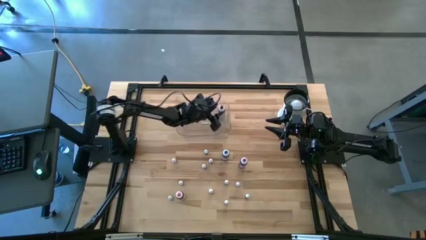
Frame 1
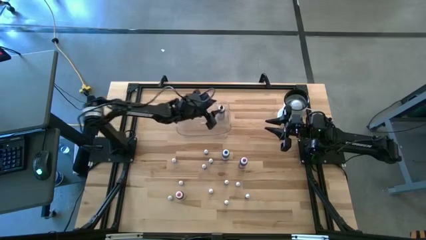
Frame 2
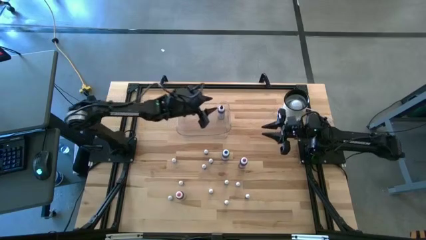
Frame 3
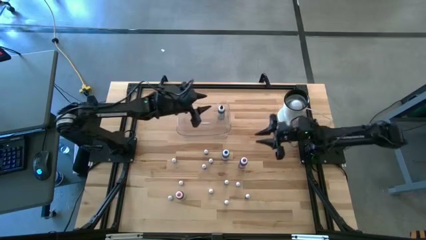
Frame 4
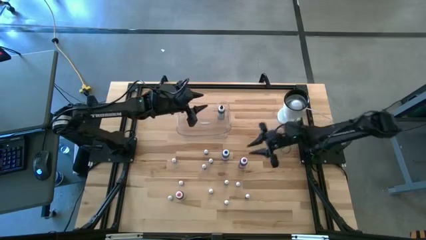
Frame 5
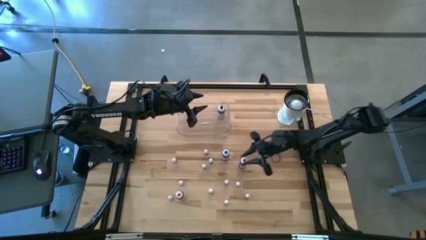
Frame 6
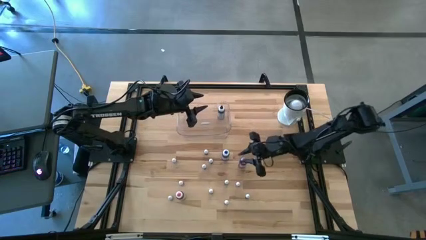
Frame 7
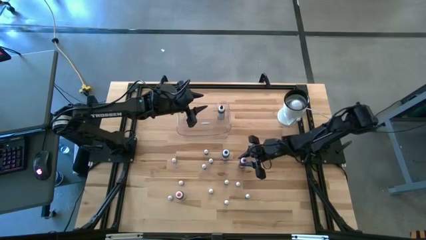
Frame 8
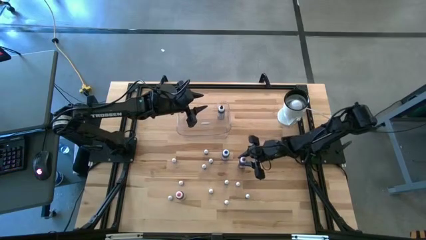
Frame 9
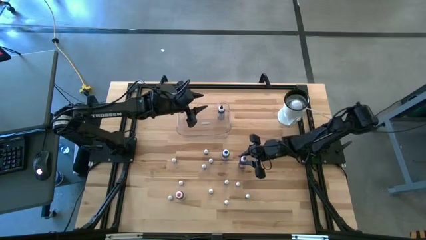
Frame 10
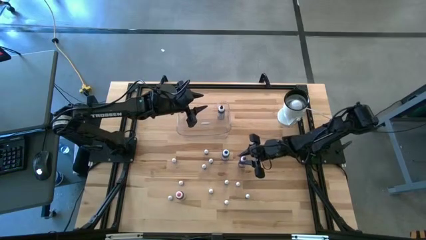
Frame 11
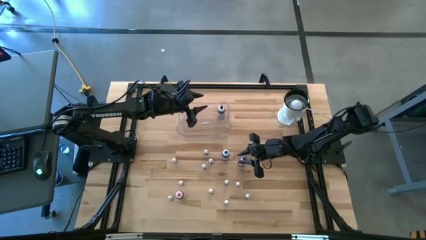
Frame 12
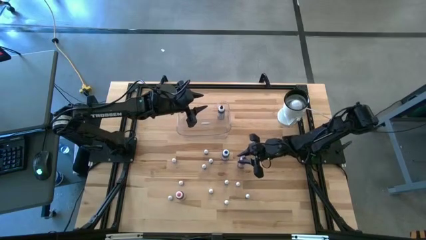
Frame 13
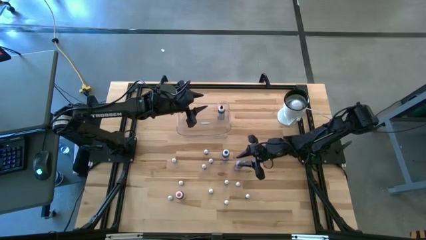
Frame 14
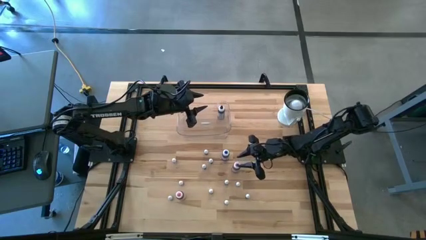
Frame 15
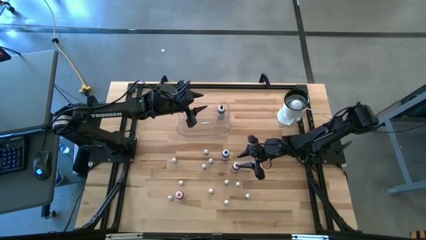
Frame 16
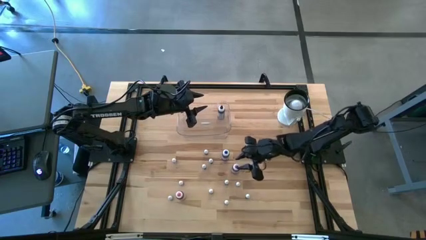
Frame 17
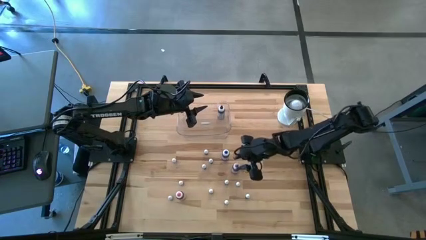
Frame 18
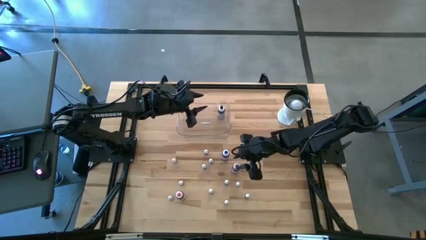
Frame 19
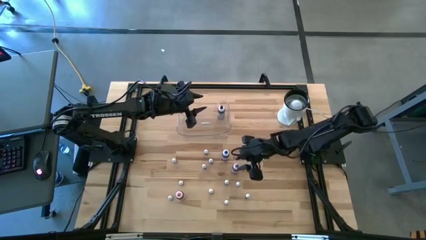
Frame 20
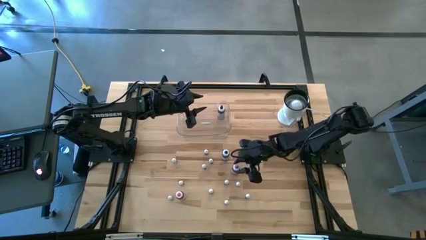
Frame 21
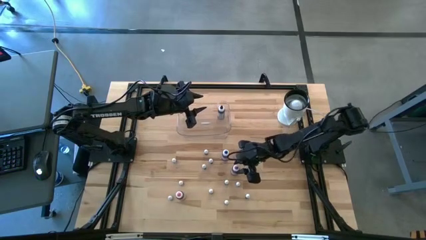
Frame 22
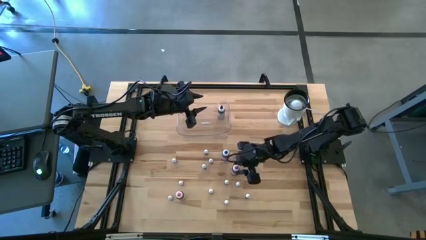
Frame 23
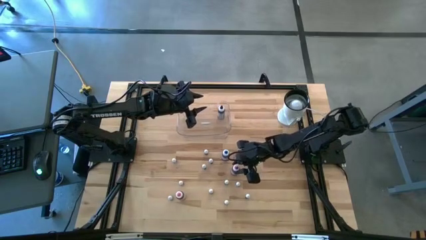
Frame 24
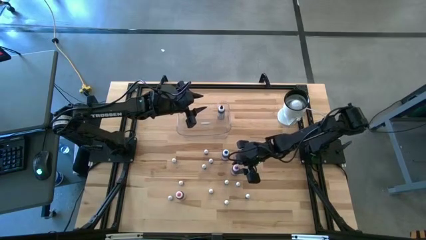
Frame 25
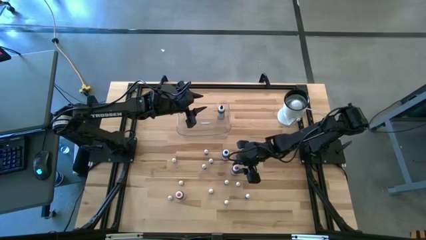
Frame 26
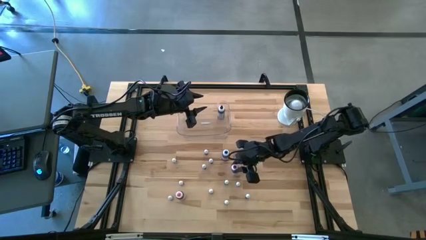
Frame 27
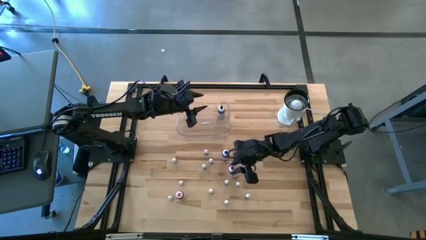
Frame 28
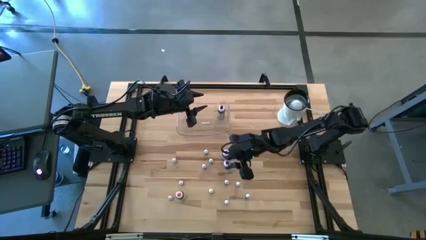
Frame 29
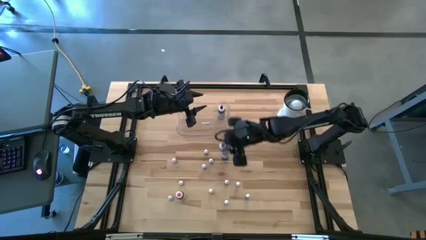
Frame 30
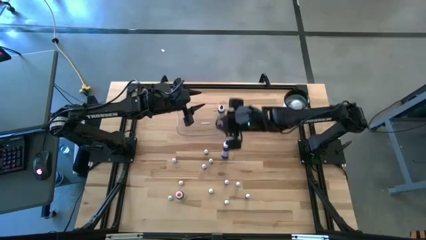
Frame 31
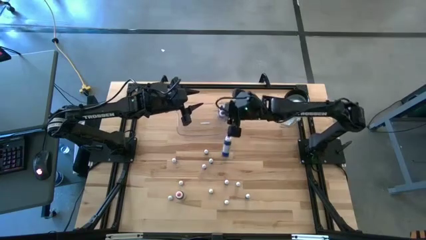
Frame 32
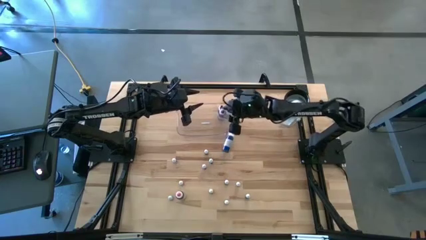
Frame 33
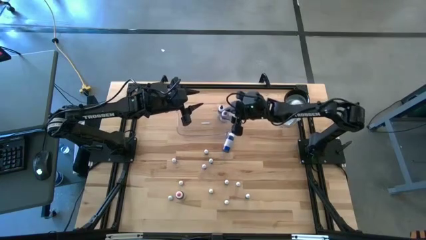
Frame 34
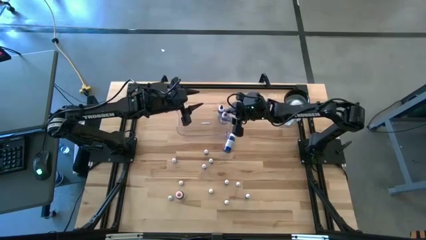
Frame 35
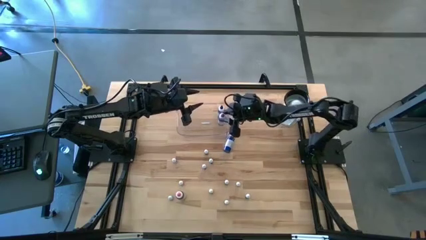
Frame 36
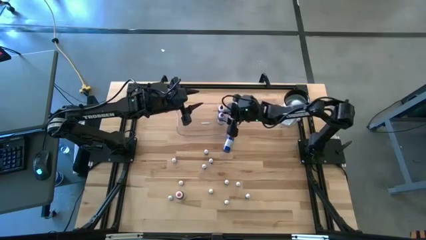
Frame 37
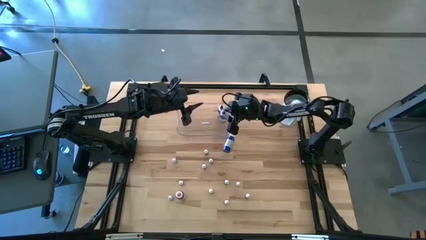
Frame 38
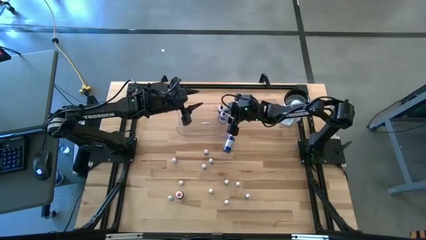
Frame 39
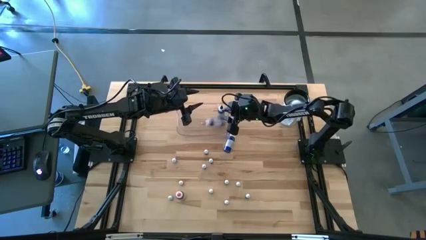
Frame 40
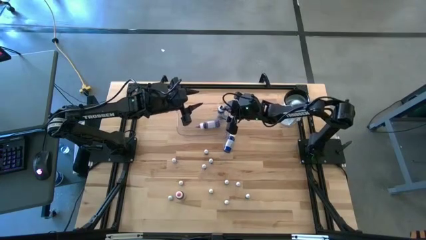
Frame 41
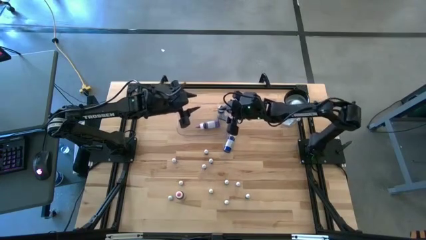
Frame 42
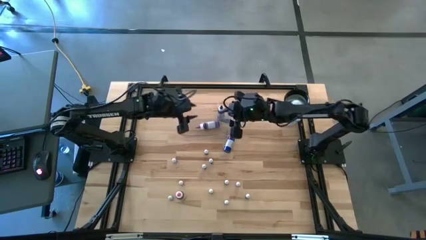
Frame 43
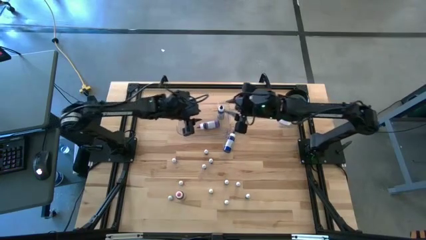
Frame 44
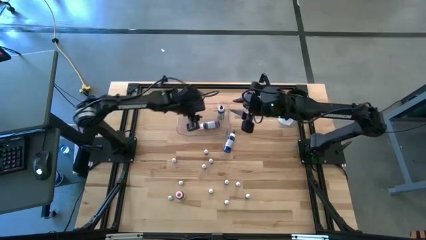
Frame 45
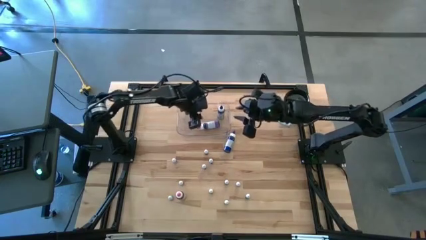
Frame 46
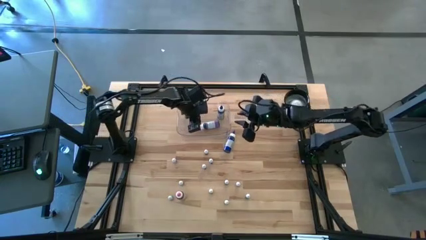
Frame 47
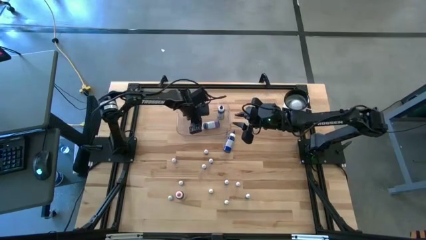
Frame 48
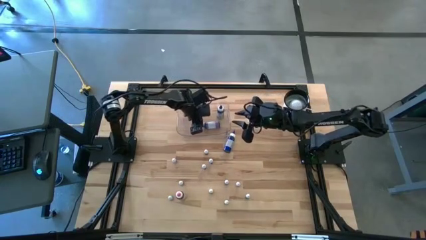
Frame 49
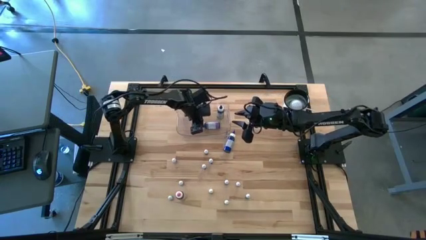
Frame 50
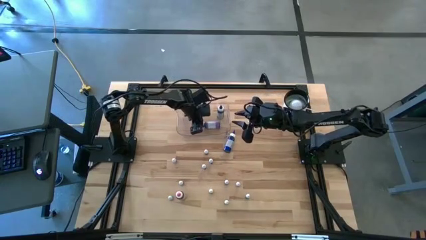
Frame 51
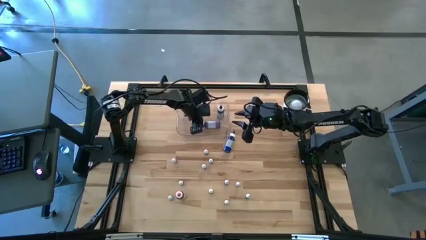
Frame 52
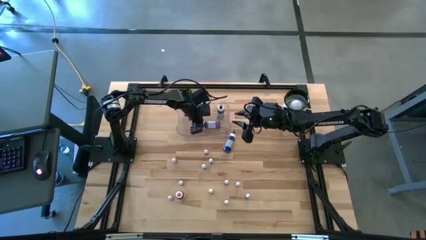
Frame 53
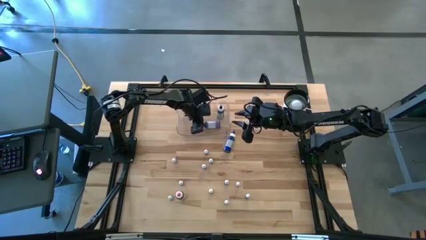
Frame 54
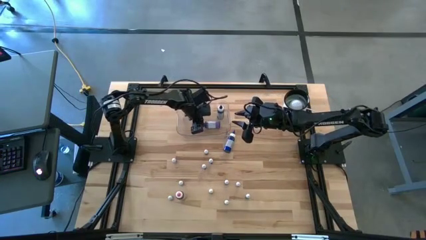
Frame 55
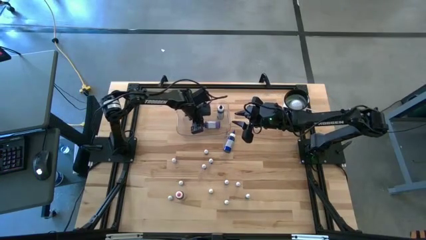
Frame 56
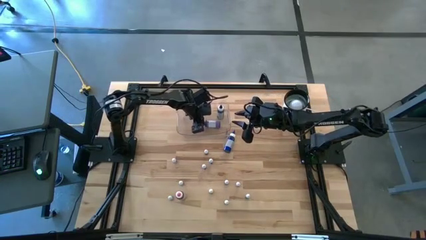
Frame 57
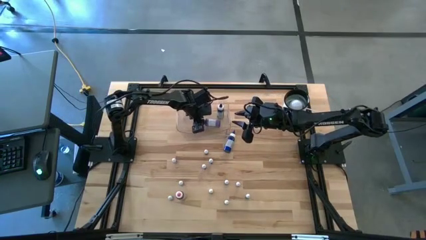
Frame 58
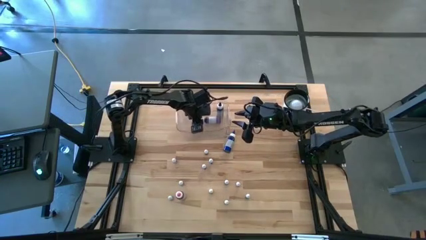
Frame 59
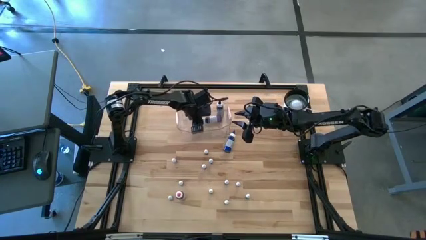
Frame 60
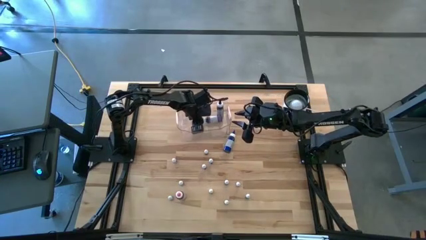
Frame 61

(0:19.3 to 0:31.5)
Task: Pick & Place food coloring
Put the large purple food coloring bottle into the transparent bin

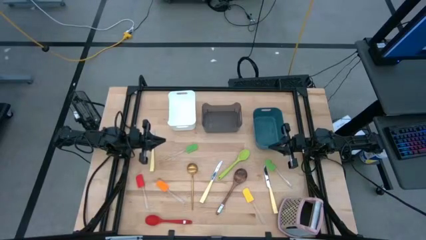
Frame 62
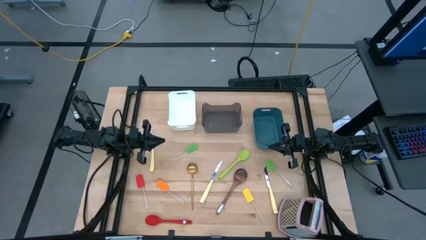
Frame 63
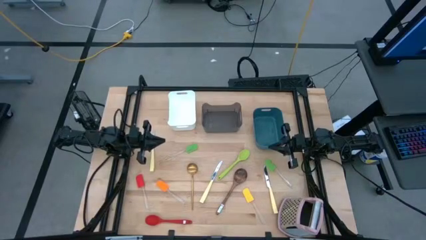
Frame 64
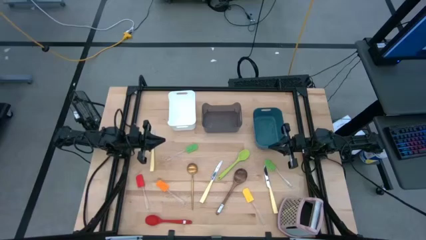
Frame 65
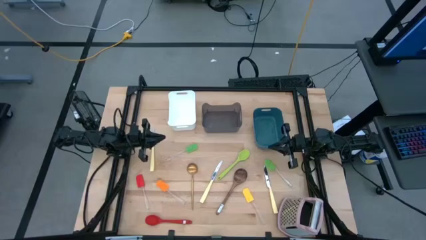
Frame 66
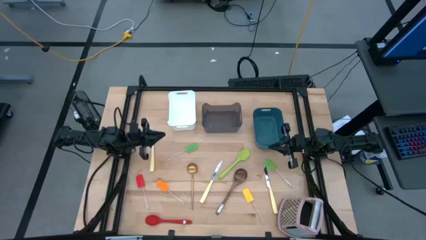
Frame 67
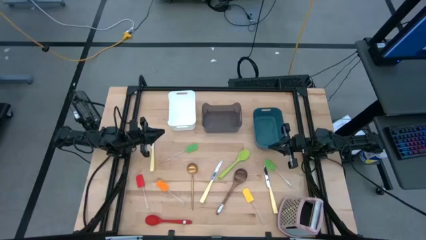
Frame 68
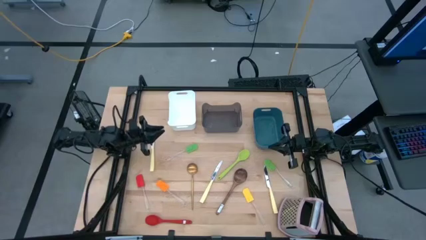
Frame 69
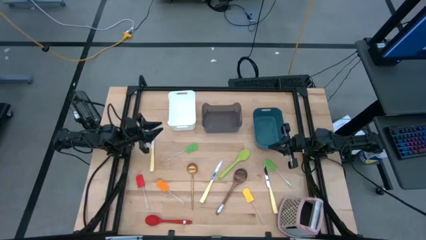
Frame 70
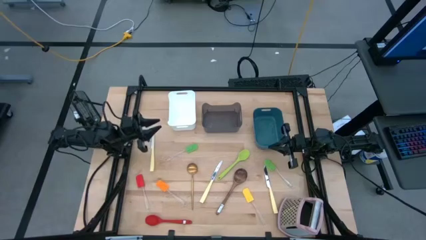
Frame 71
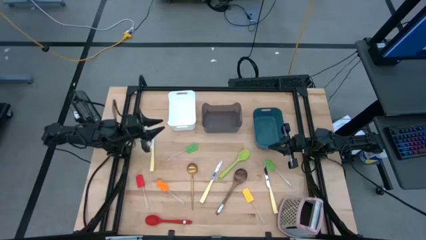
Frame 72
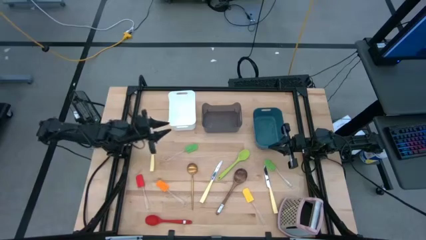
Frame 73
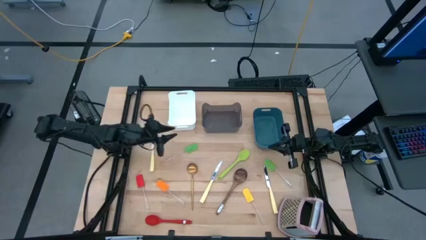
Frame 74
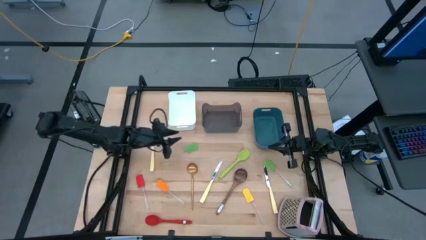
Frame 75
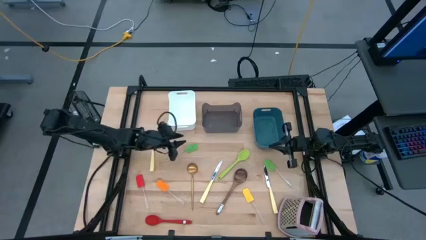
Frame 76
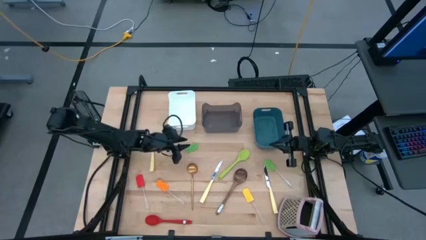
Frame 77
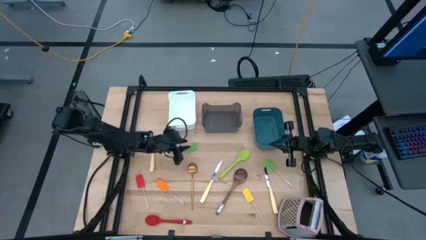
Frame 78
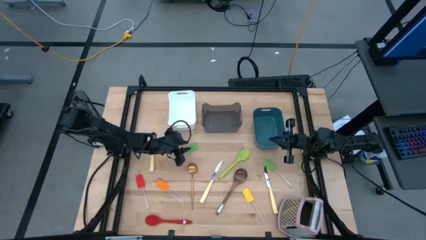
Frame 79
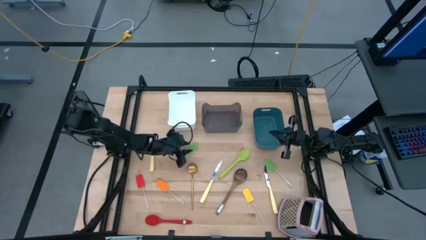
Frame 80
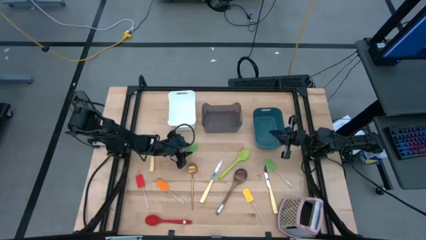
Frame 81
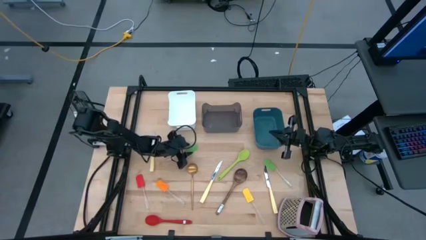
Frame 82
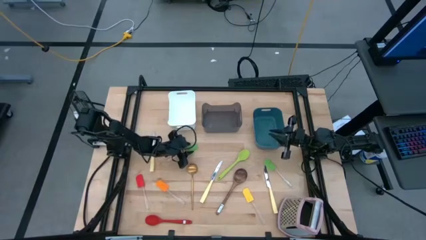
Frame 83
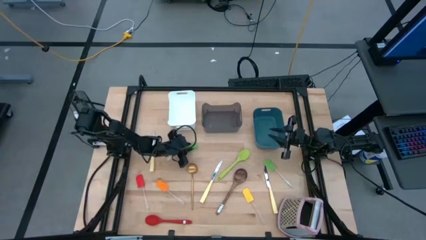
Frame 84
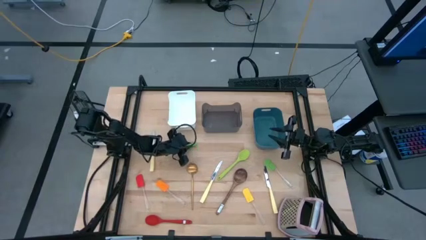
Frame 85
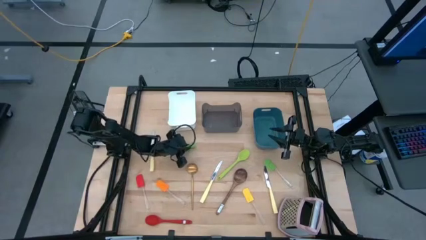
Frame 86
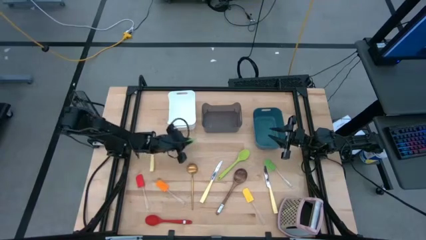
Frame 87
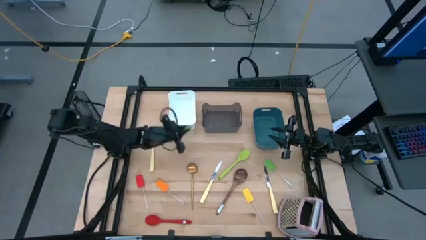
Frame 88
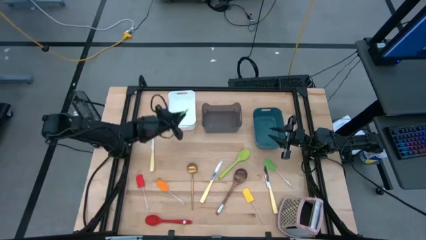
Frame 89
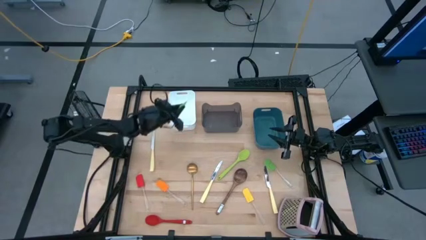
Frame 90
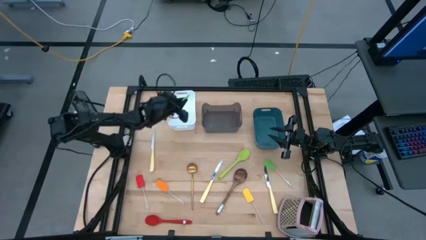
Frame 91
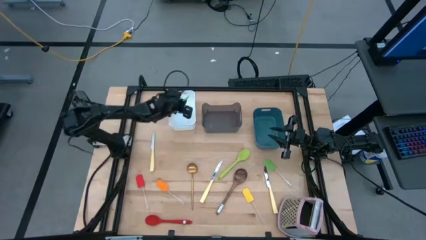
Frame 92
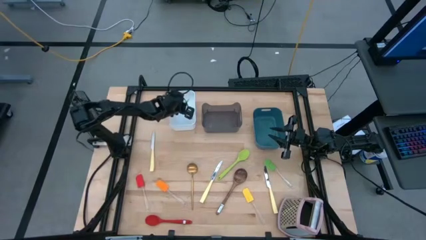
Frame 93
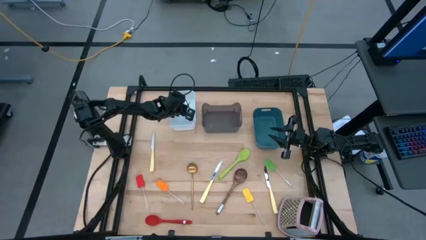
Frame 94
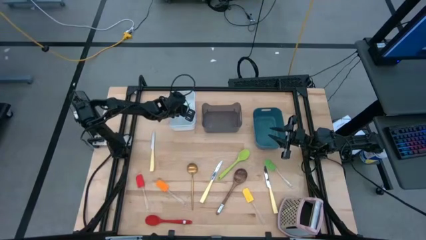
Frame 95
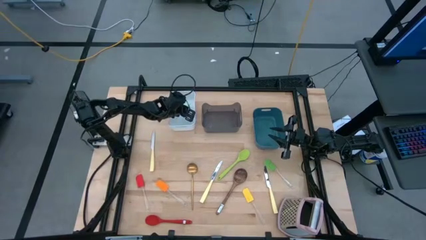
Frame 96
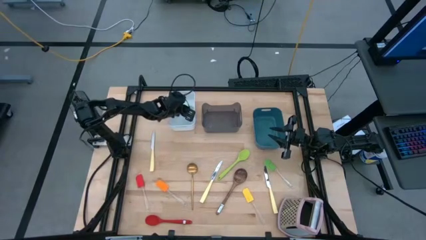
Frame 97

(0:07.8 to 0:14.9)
Task: Pick & Place Kitchen Items
Put the left green spatula into the white bin
